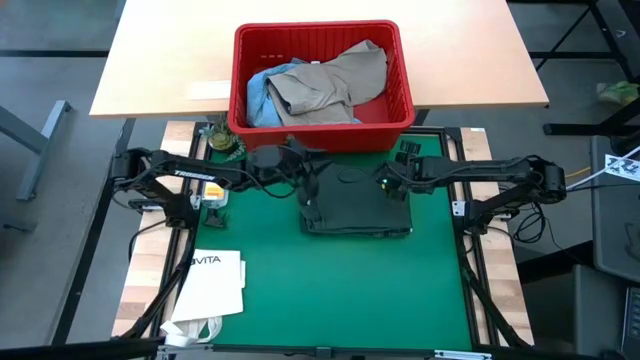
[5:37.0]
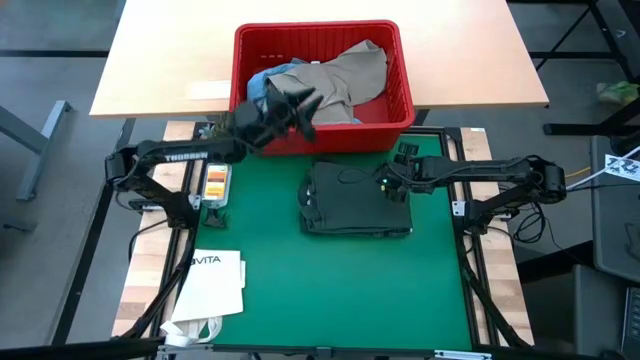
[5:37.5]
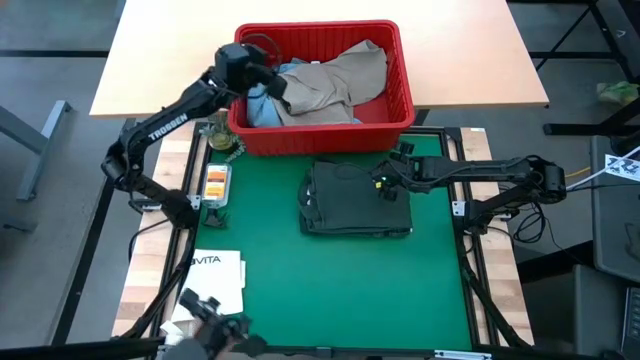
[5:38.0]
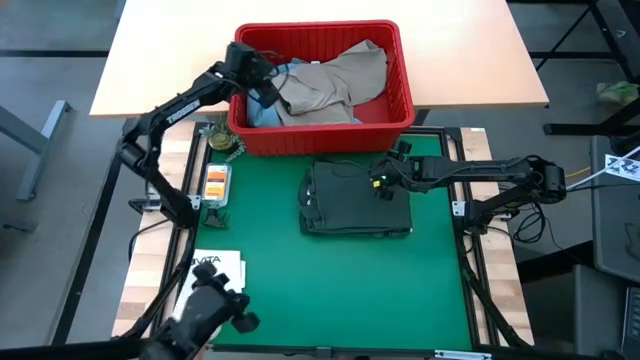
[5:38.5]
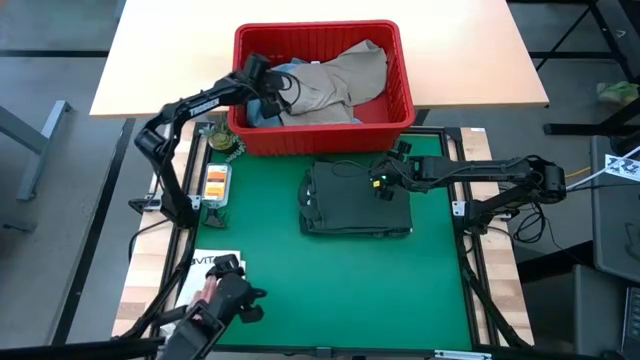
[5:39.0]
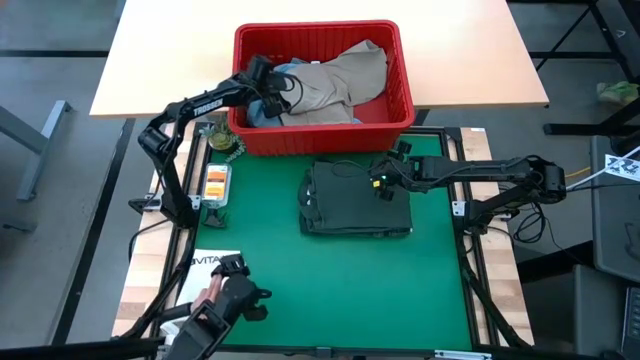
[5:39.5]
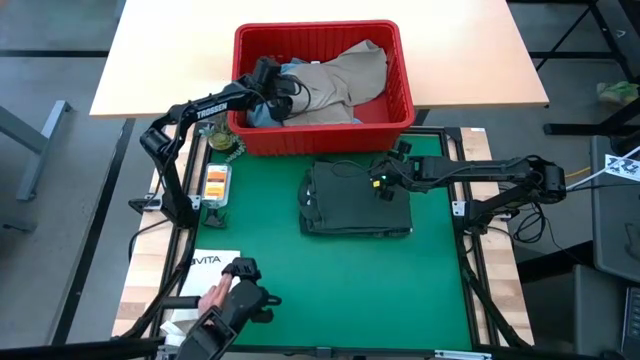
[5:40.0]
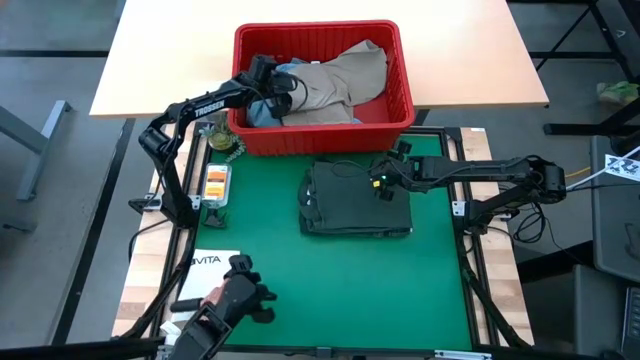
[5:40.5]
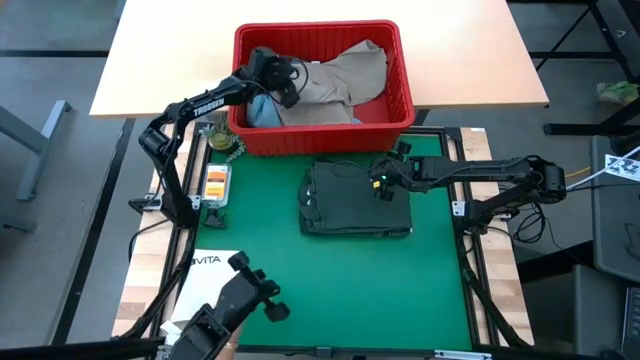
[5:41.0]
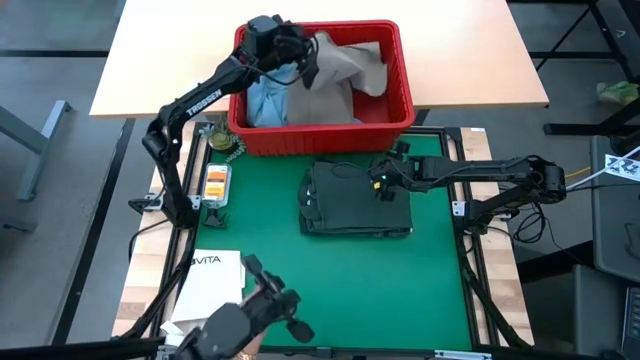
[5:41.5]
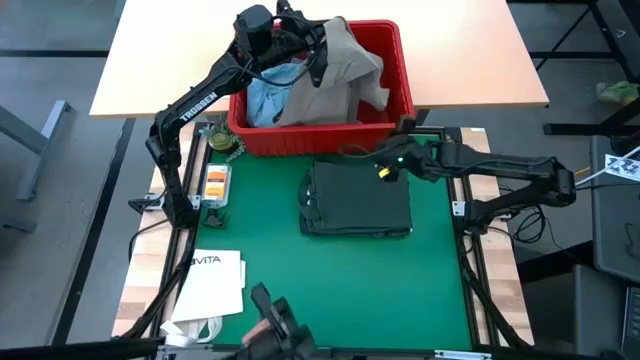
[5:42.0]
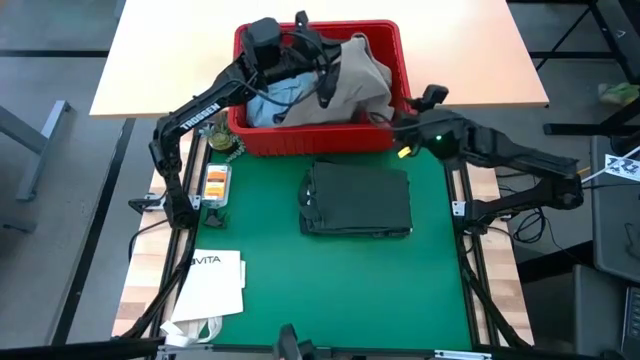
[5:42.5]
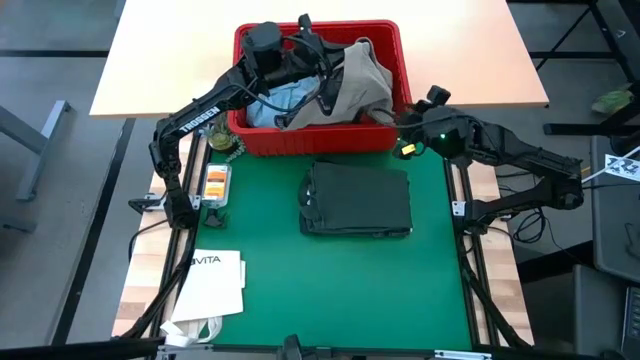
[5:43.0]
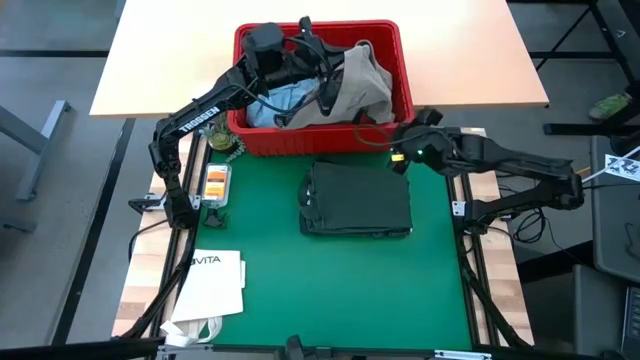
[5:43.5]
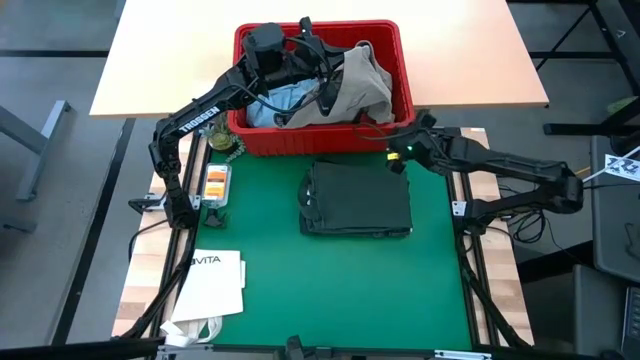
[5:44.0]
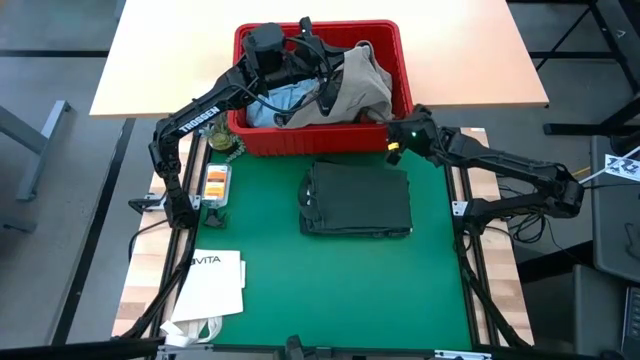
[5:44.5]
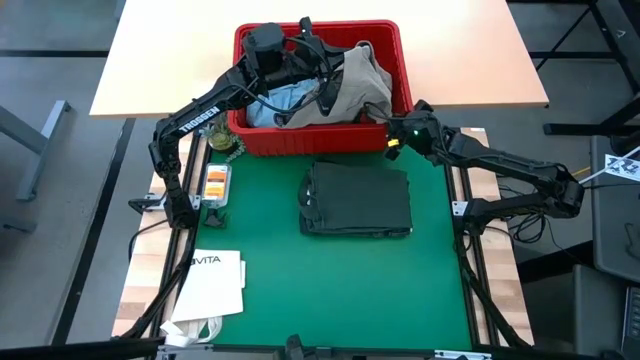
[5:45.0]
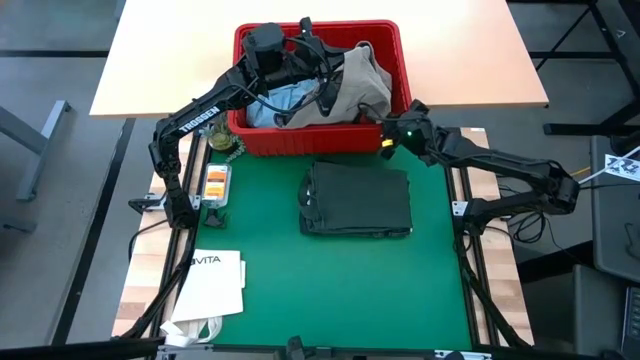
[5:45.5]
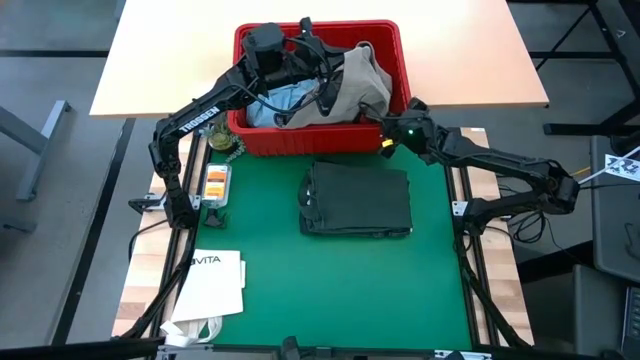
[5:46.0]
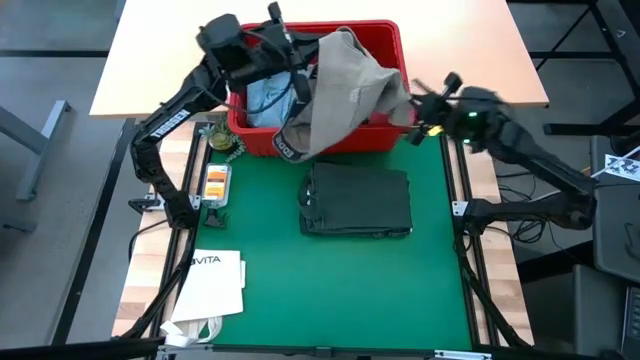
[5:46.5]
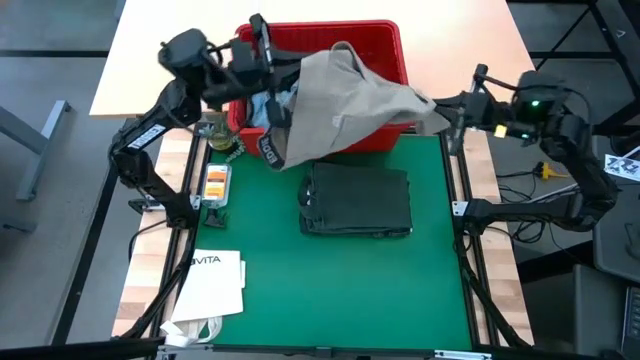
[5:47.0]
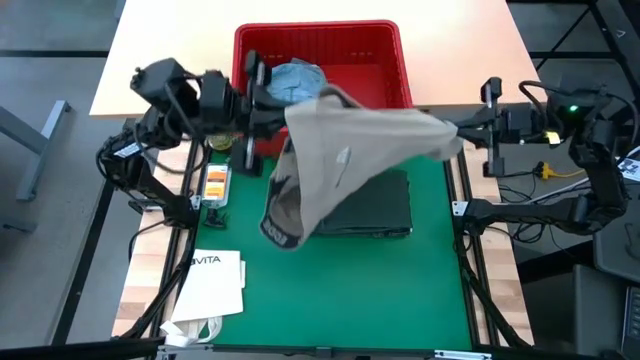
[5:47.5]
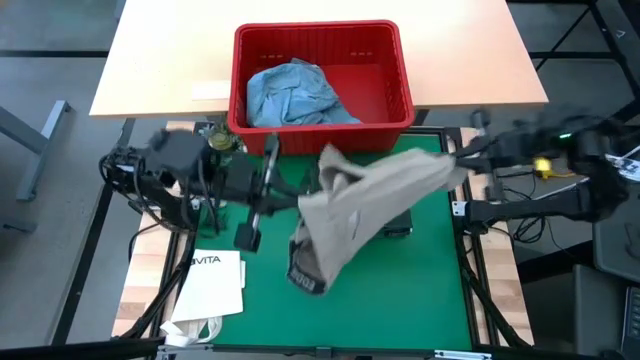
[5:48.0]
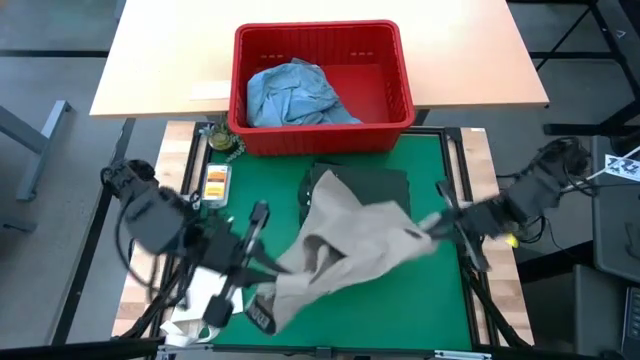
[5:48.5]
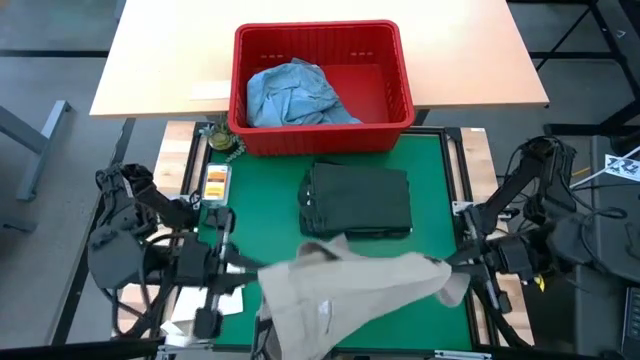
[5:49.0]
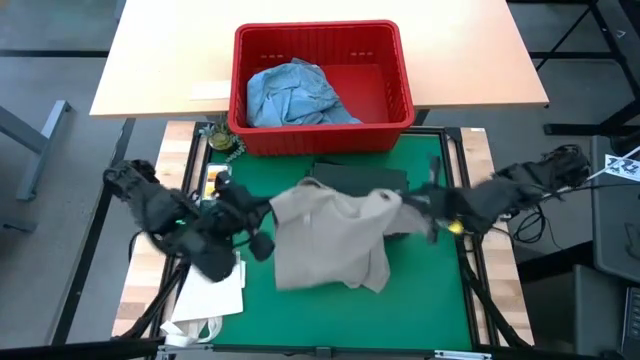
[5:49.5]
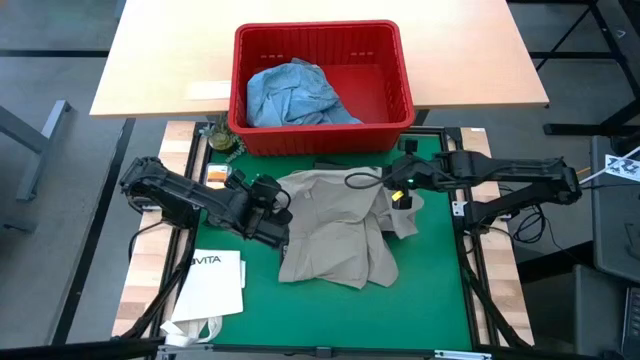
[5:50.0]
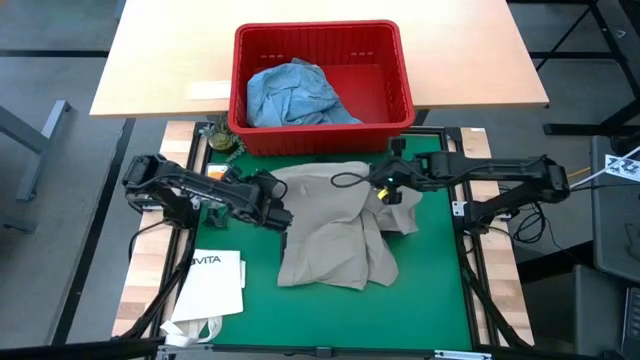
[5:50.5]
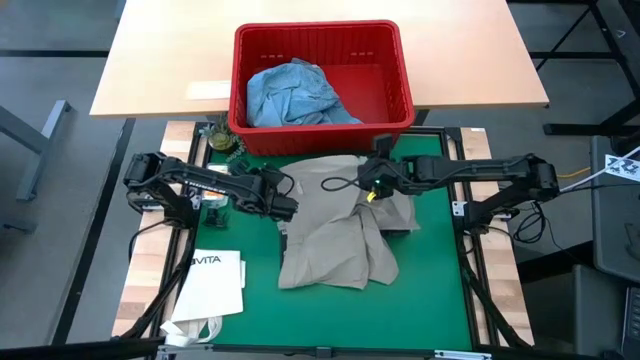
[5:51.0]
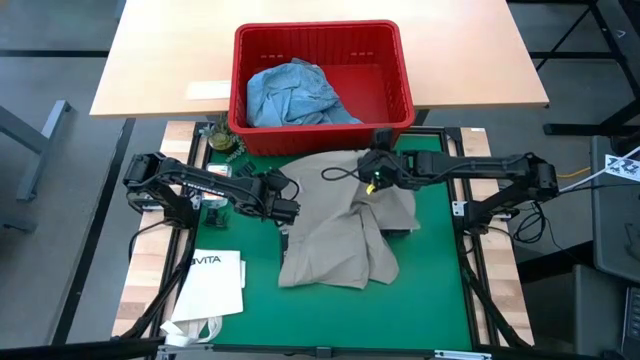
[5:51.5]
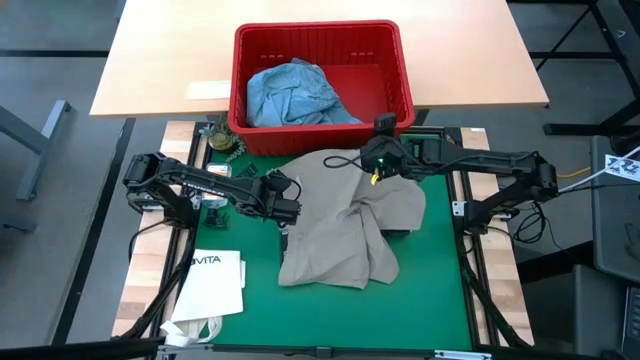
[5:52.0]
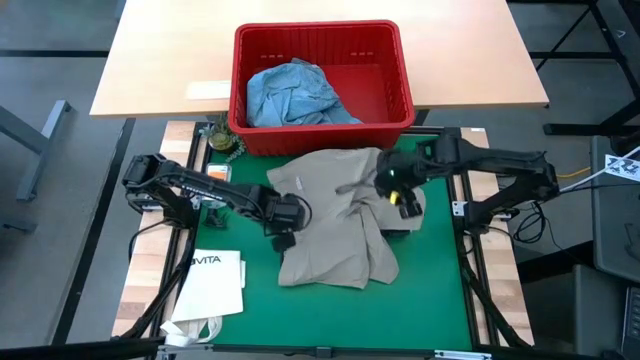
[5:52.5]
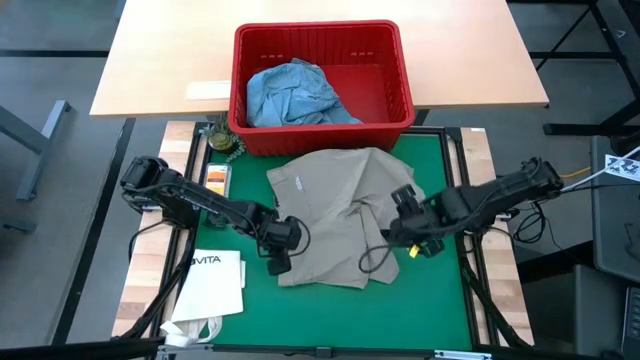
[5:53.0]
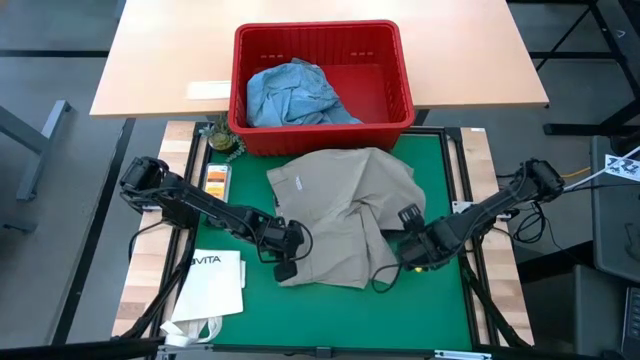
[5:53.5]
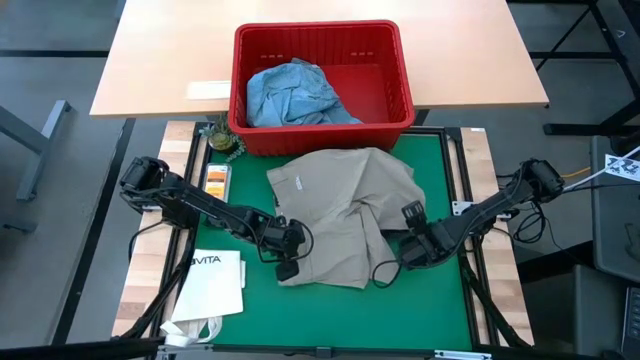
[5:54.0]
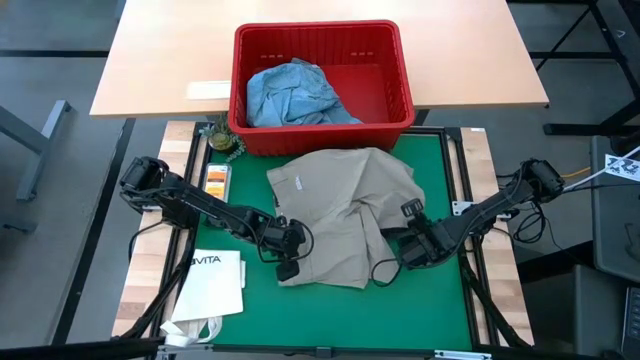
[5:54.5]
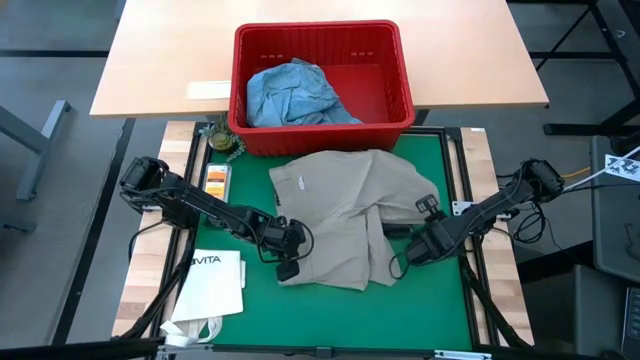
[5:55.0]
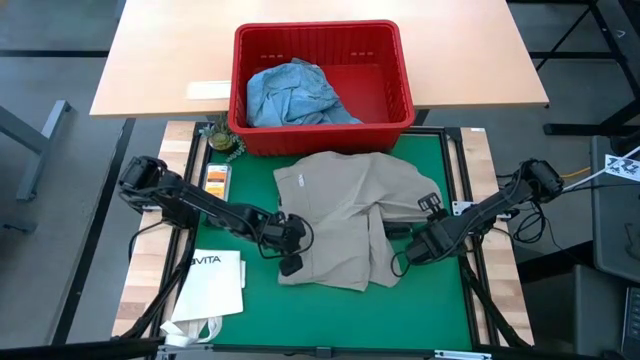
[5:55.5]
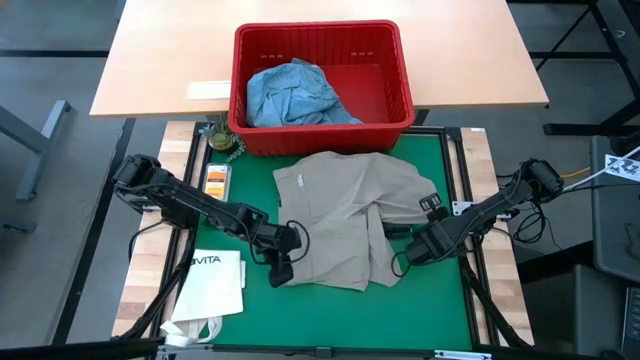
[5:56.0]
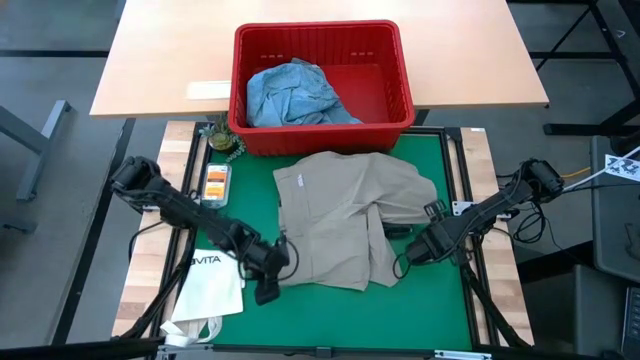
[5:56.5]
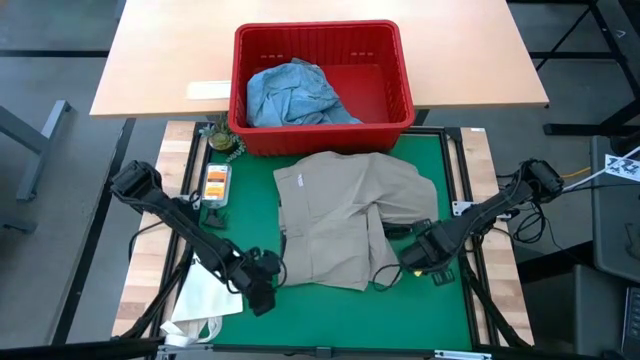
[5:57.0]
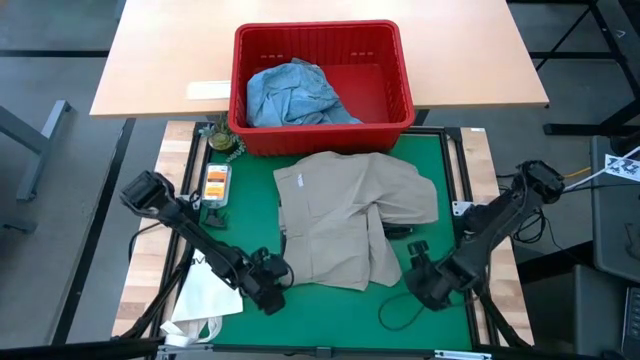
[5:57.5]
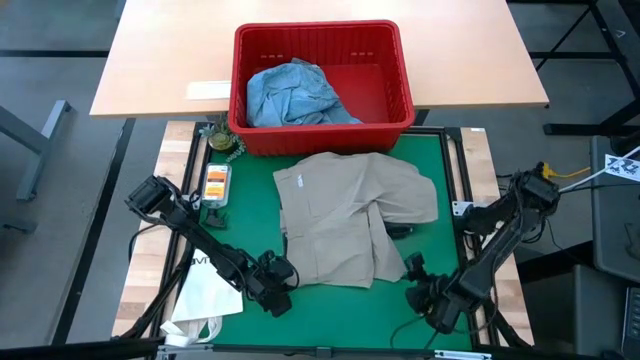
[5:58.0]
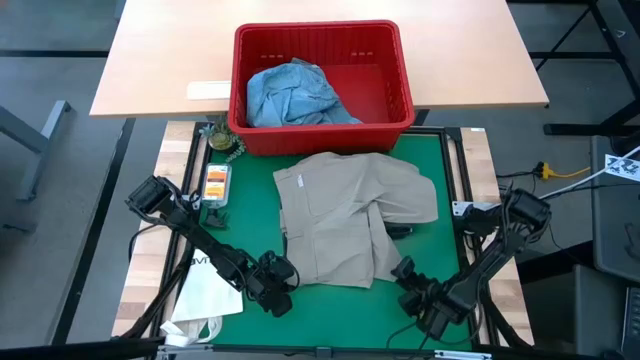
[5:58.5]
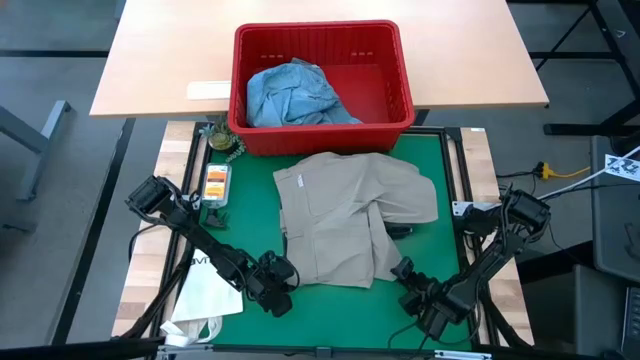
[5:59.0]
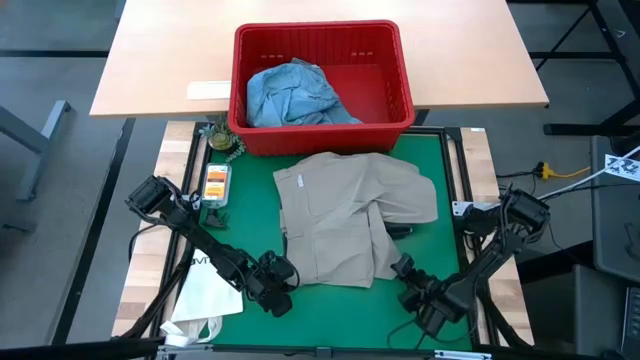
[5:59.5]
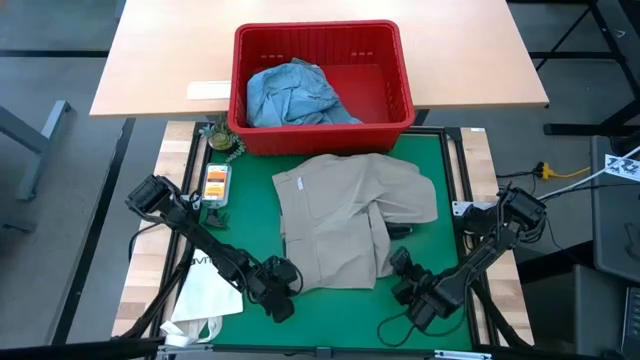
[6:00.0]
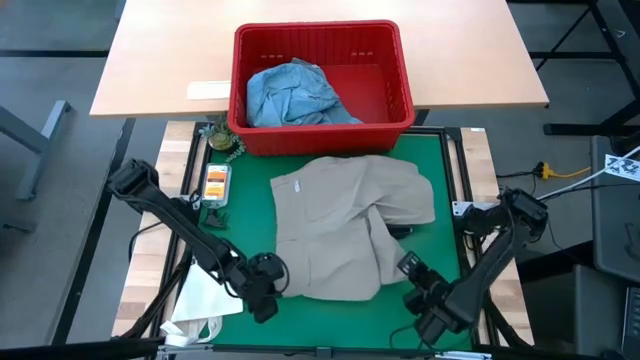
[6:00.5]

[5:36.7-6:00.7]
Task: Fold Laundry from Bin
Fold the gray shorts
